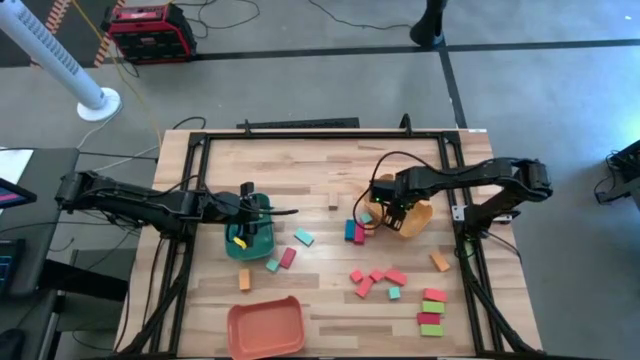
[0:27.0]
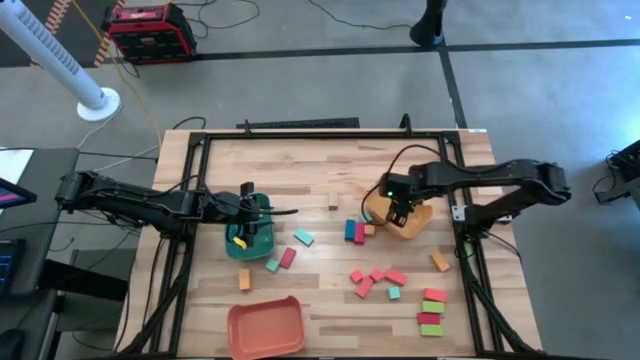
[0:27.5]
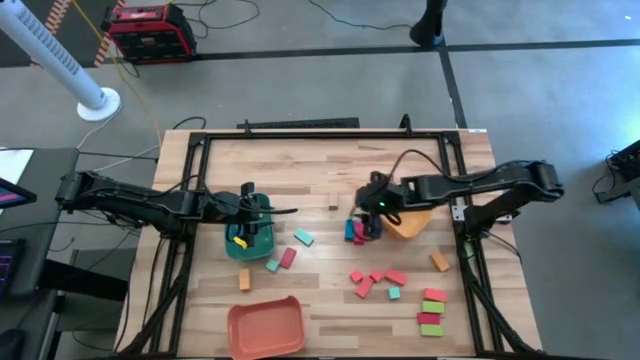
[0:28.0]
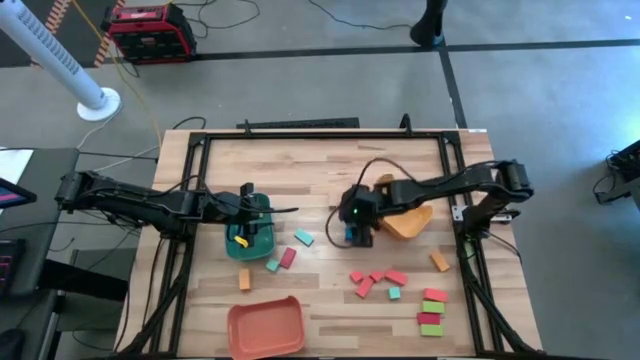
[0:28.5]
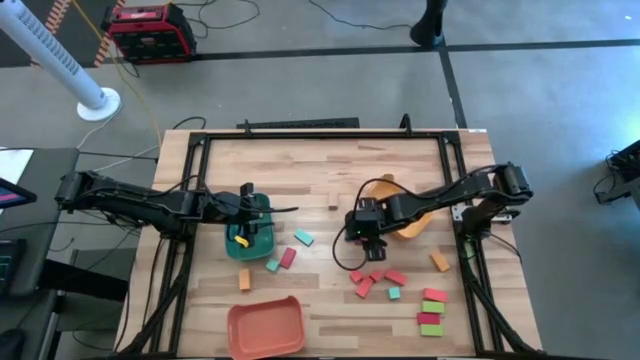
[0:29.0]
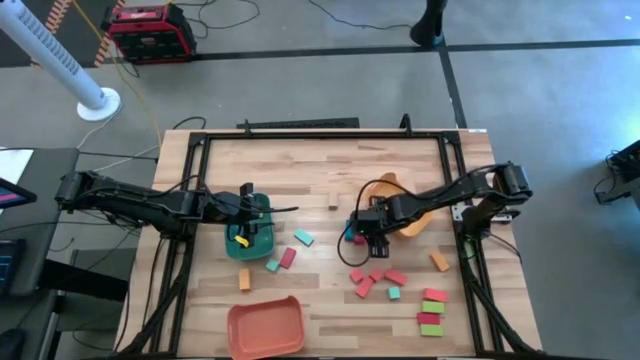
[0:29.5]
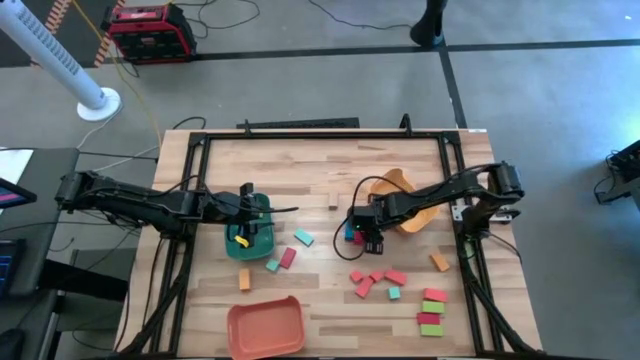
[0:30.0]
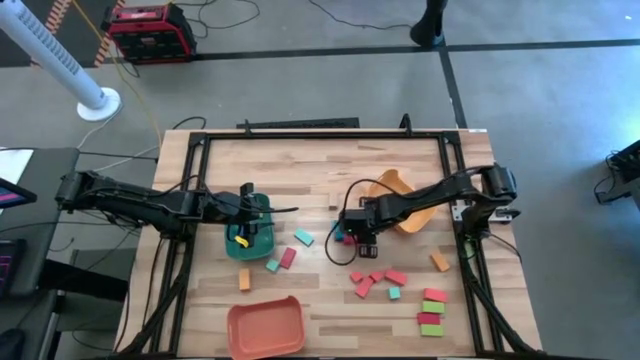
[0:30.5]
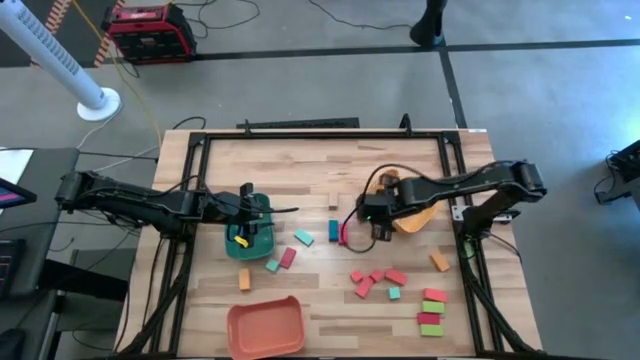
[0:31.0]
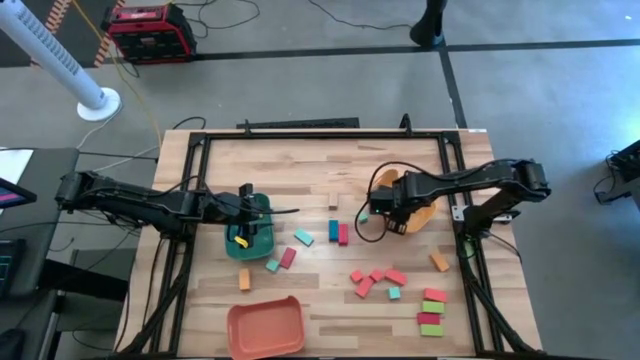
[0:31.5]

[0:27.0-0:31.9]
Task: Sort blocks by size
Put the yellow cube block into the yellow bin

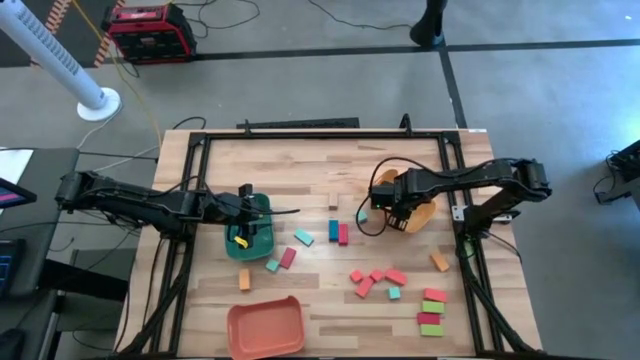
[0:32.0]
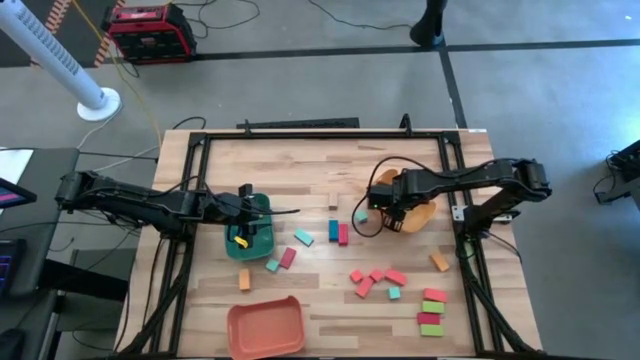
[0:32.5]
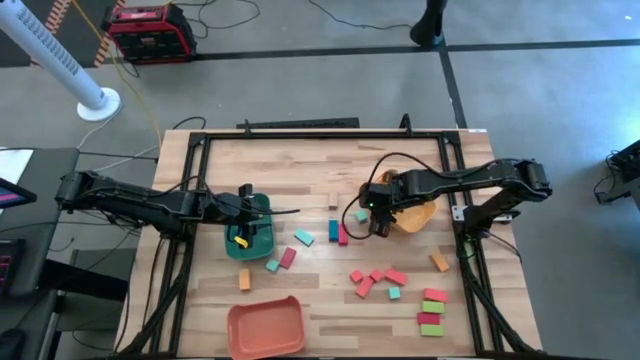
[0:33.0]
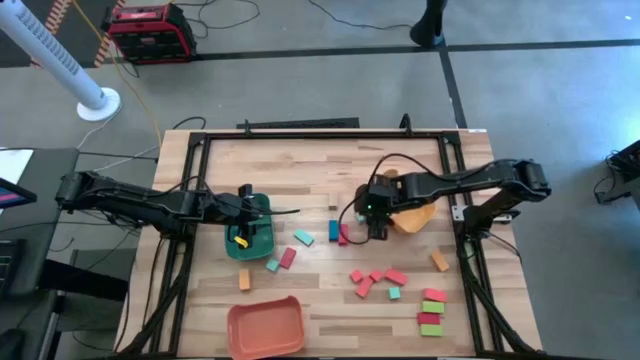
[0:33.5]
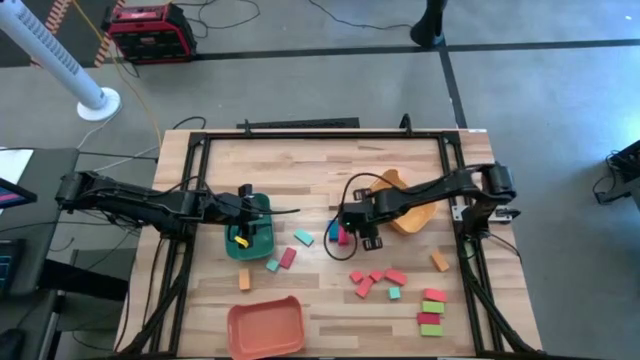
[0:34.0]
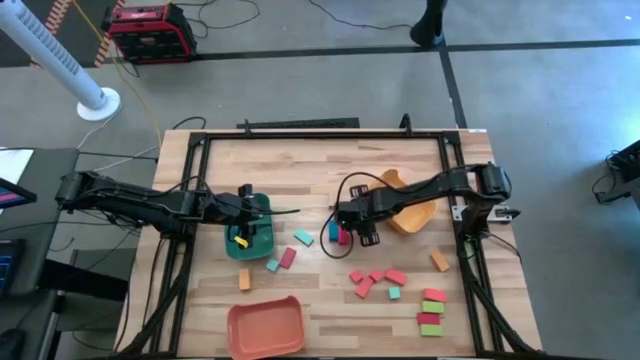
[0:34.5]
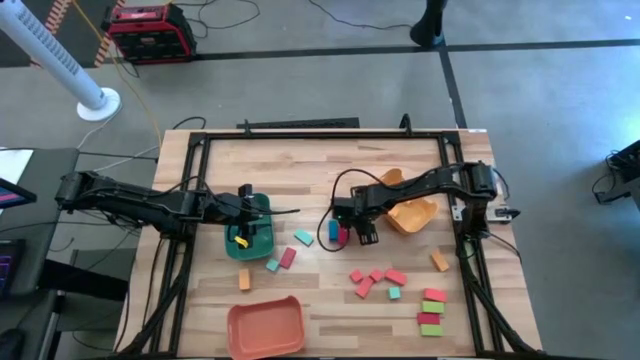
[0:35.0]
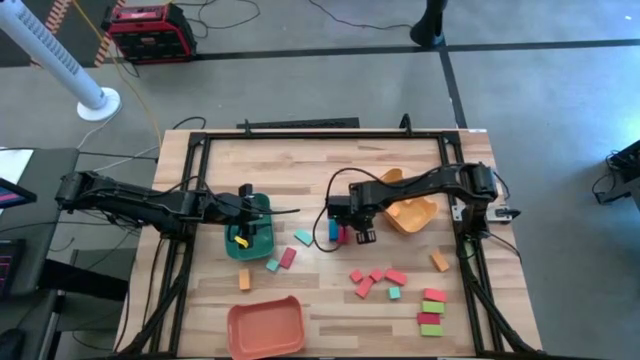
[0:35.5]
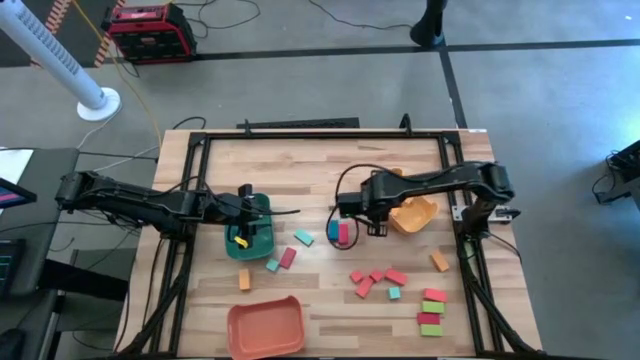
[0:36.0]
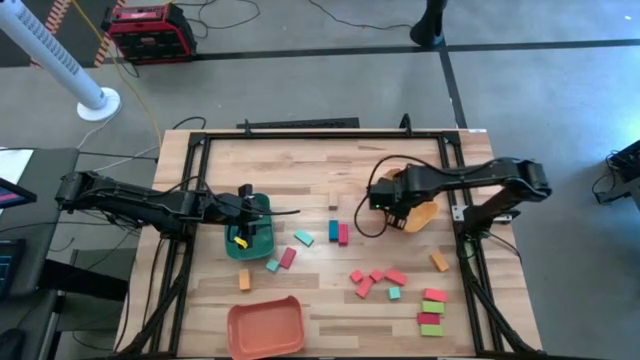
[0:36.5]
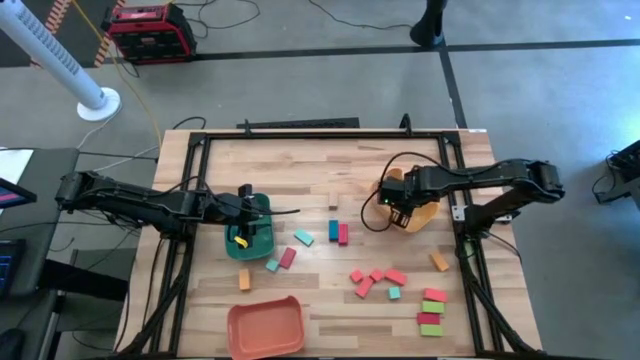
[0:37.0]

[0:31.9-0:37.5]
Put the top light blue cube block into the yellow bin

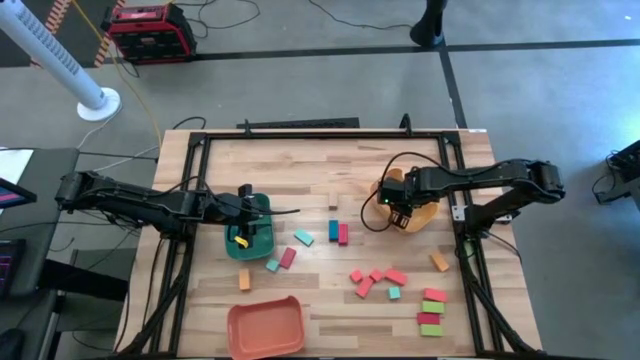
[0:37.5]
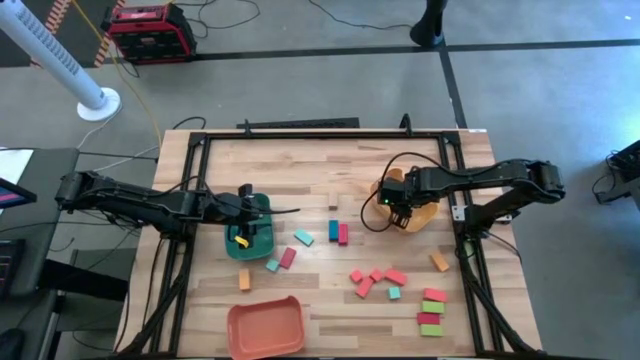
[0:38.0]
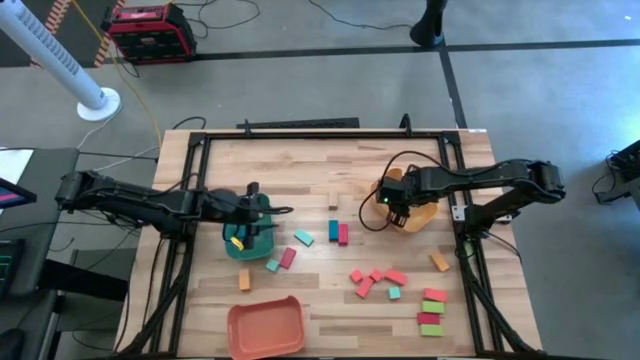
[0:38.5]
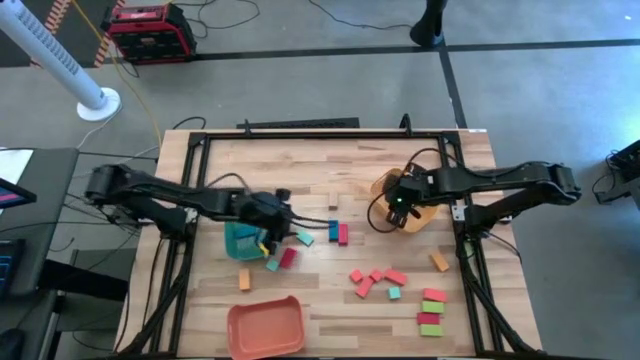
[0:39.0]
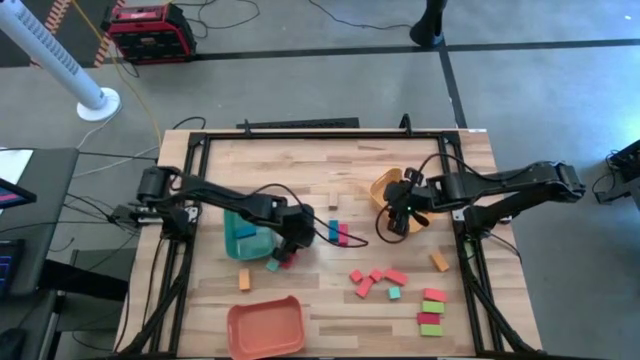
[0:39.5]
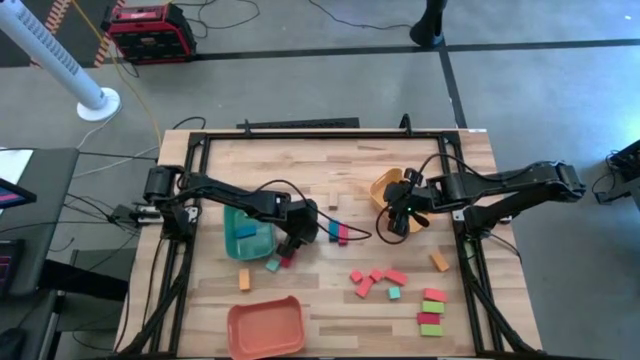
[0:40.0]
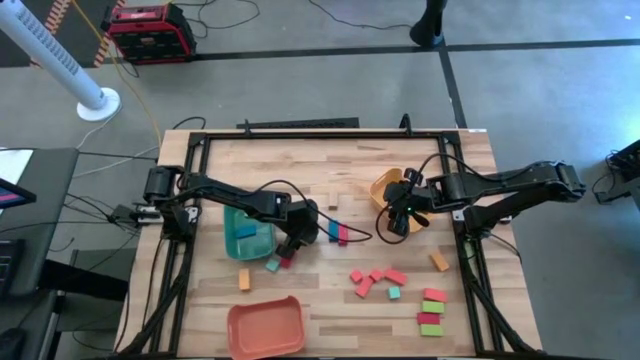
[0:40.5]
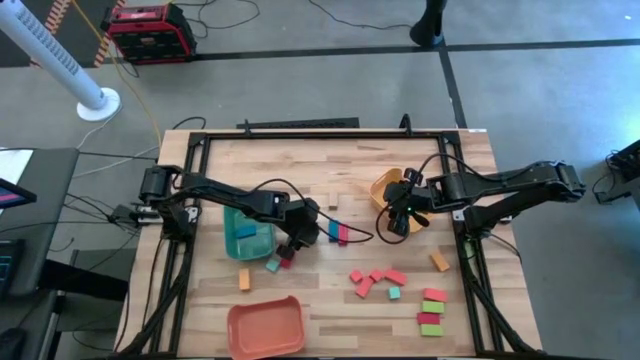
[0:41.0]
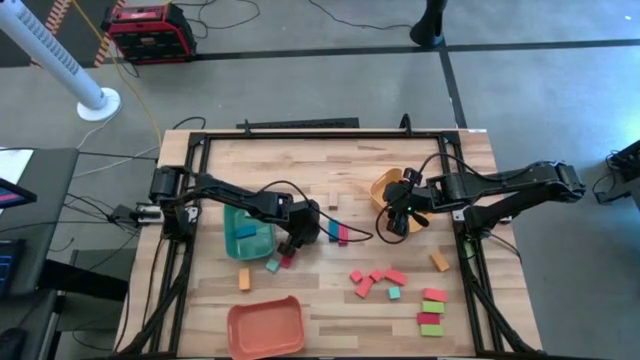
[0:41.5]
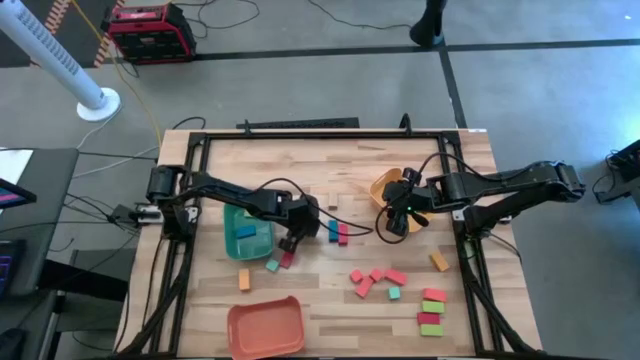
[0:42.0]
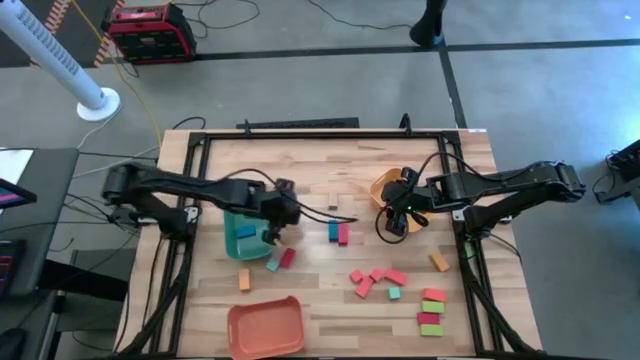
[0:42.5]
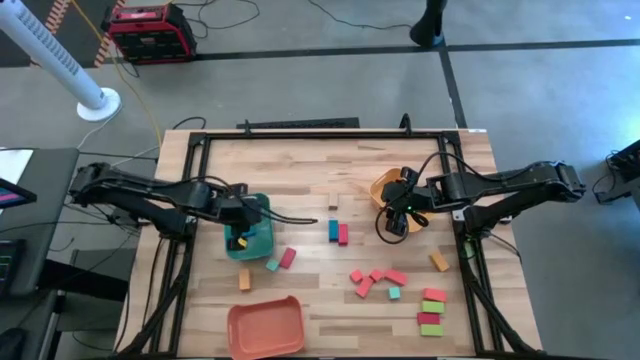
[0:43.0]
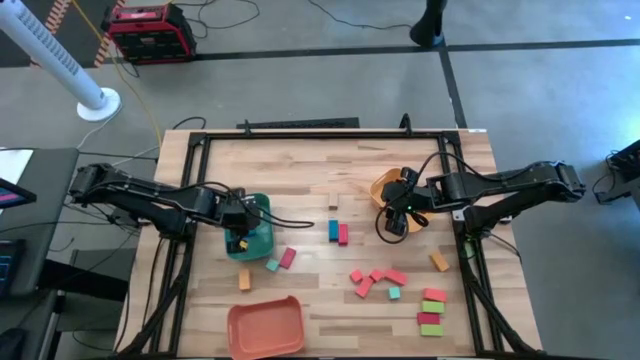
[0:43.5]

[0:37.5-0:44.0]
Put the thin light blue rectangular block into the green bin

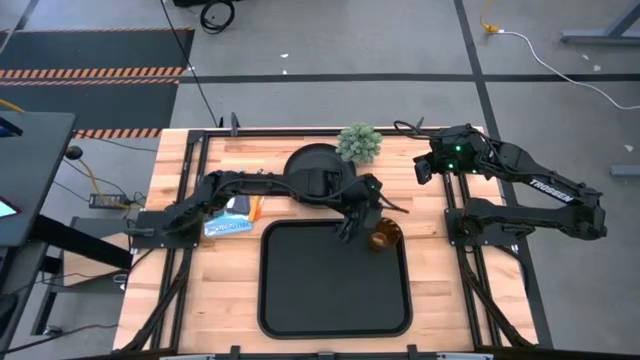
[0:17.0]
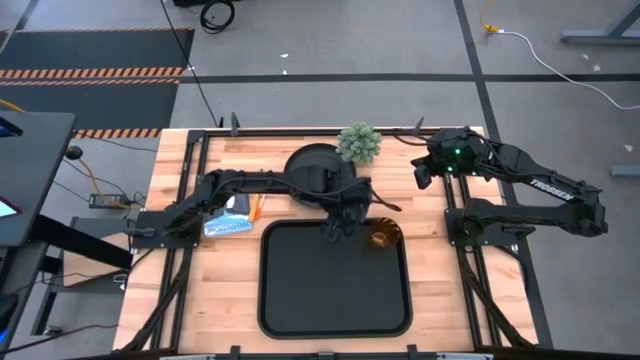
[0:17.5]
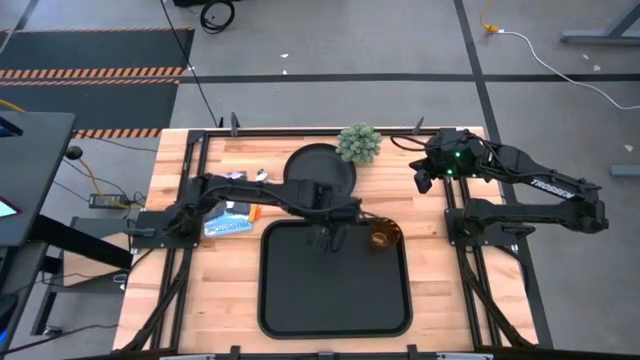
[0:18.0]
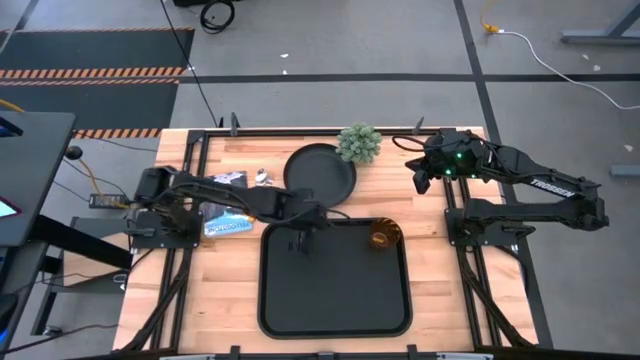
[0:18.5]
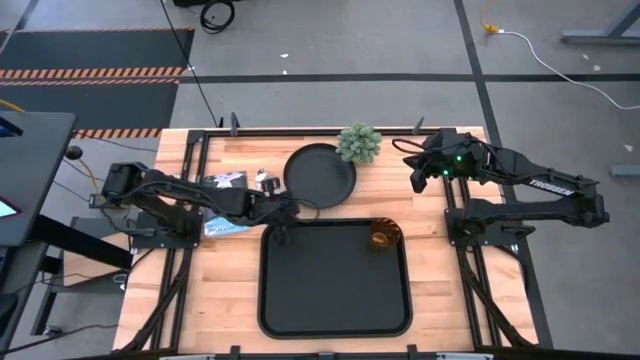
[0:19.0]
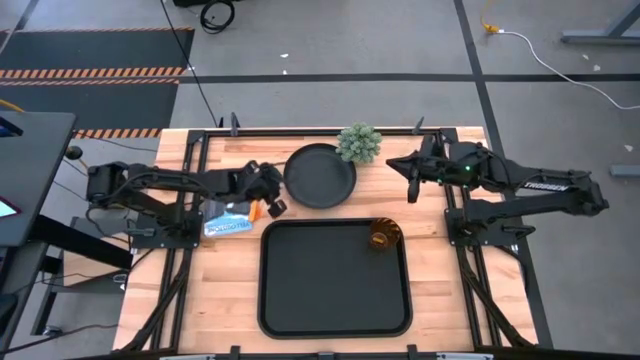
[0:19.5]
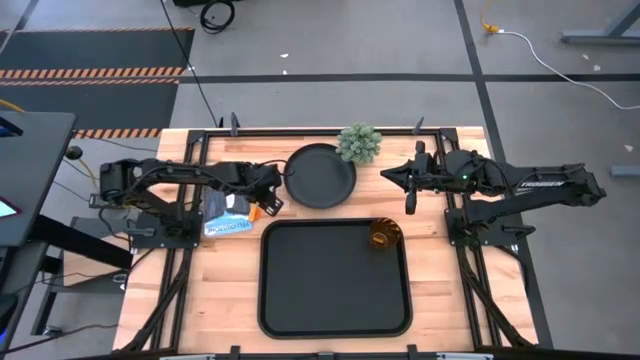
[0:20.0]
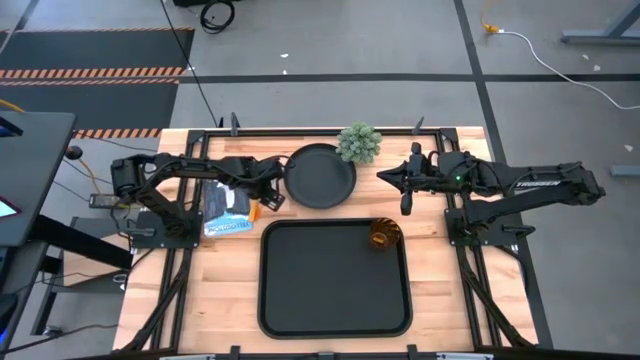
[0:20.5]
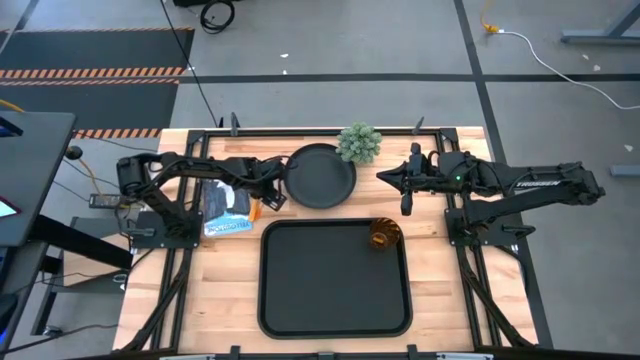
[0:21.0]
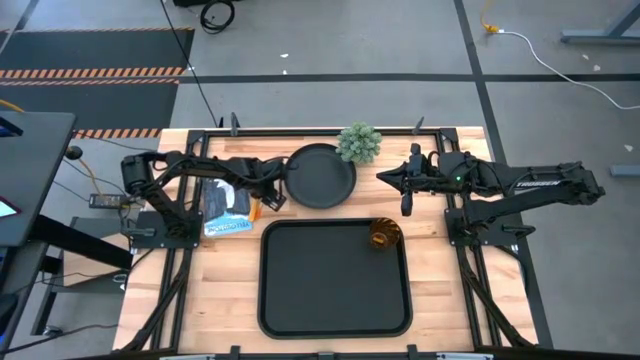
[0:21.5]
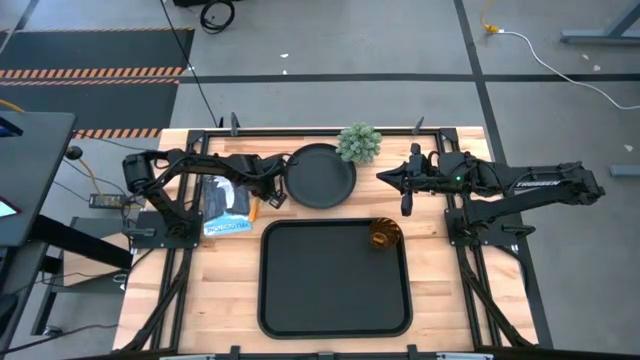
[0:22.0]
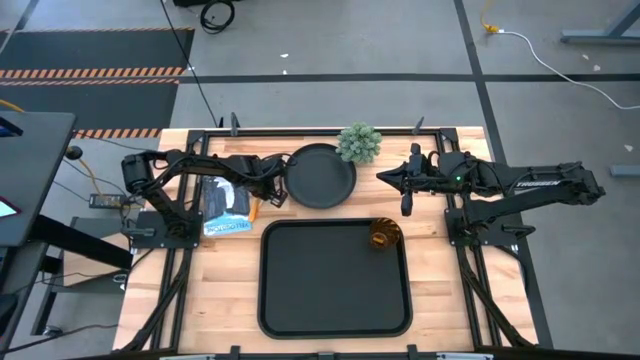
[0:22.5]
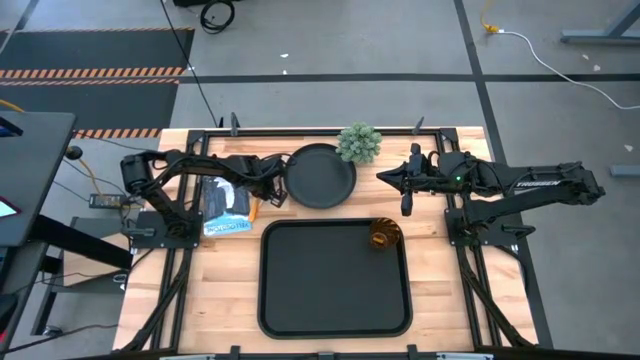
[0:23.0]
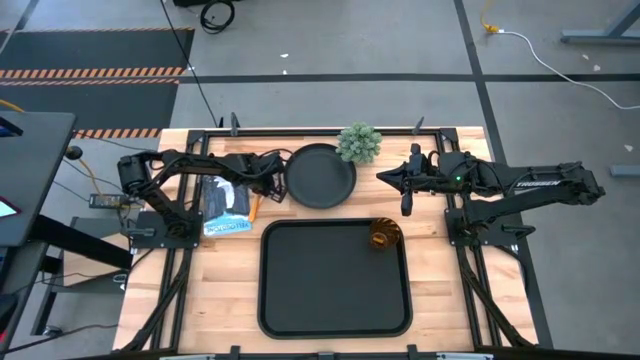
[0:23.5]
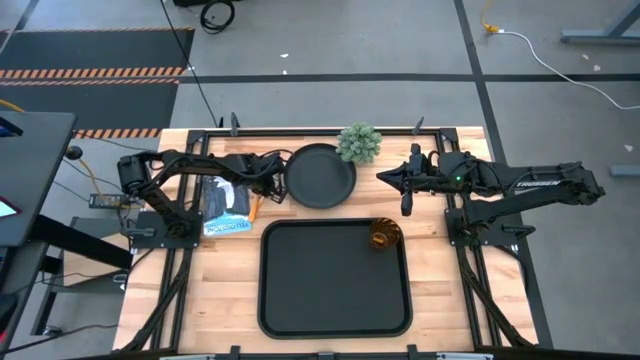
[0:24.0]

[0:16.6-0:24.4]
Task: Pick and place plate/cup/fork/spoon on tray
Put the black plate on the black tray
